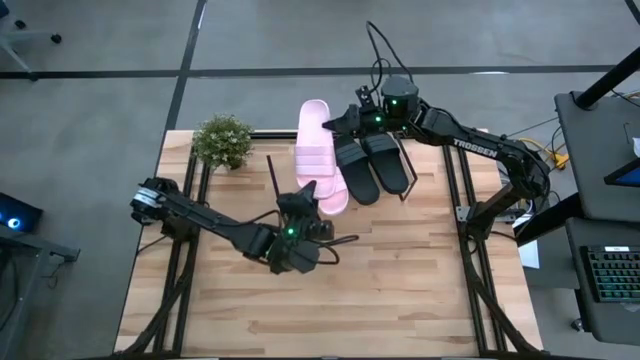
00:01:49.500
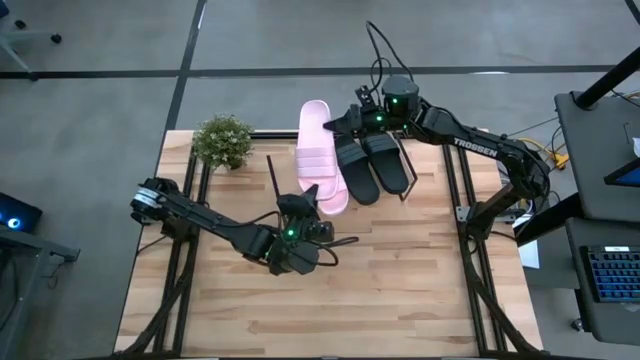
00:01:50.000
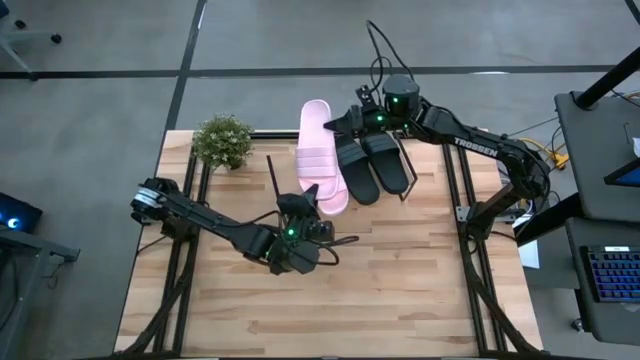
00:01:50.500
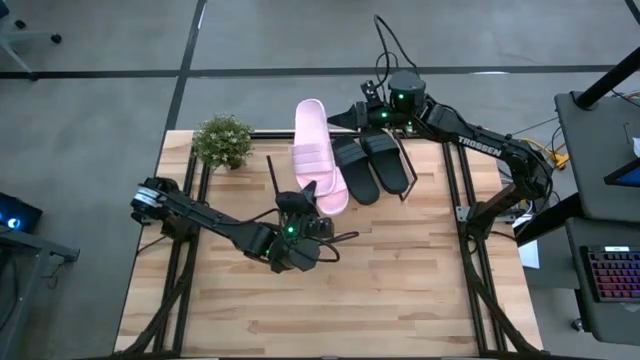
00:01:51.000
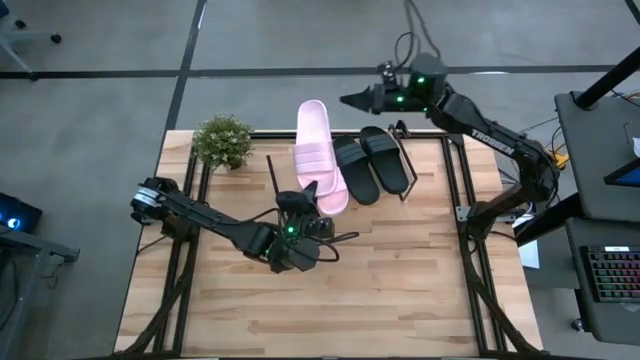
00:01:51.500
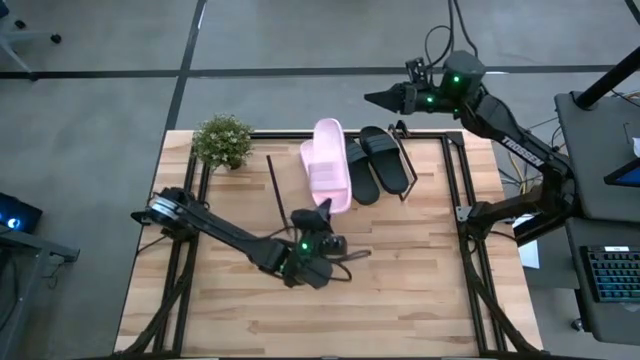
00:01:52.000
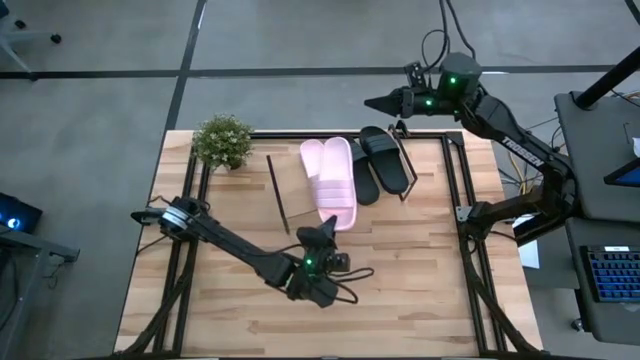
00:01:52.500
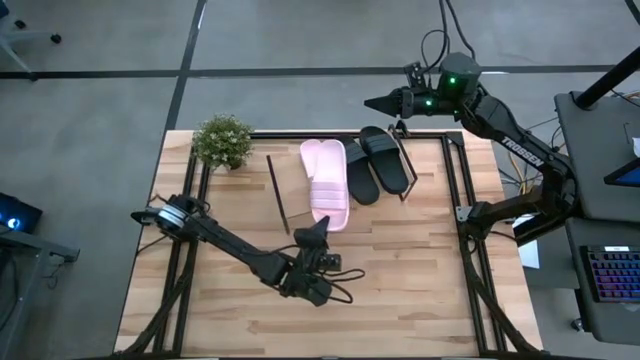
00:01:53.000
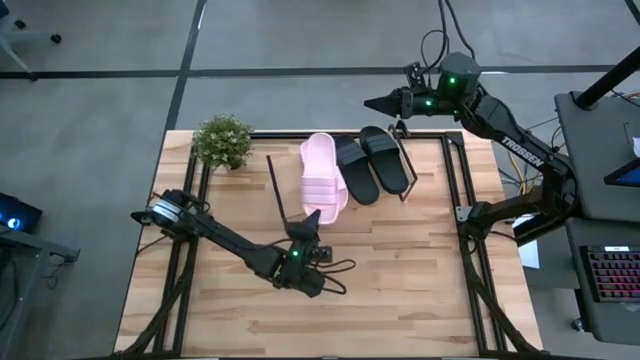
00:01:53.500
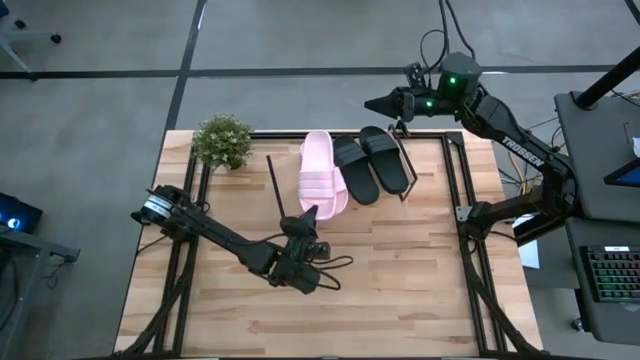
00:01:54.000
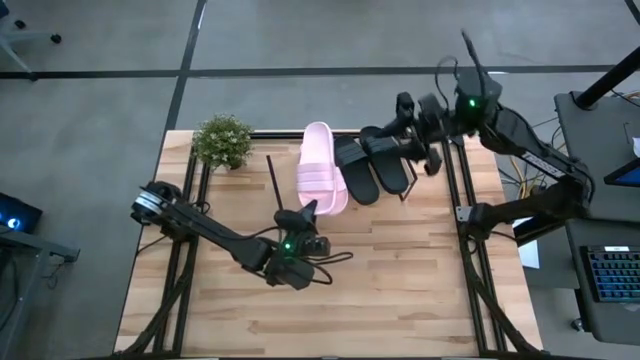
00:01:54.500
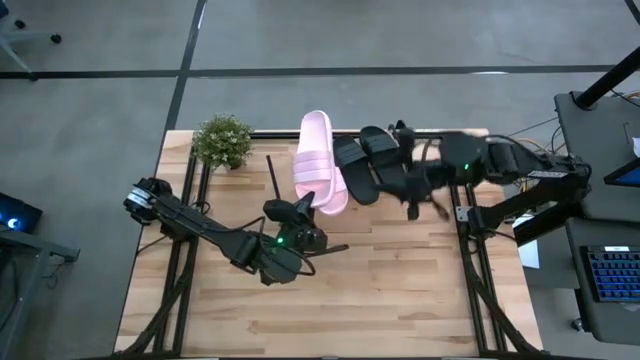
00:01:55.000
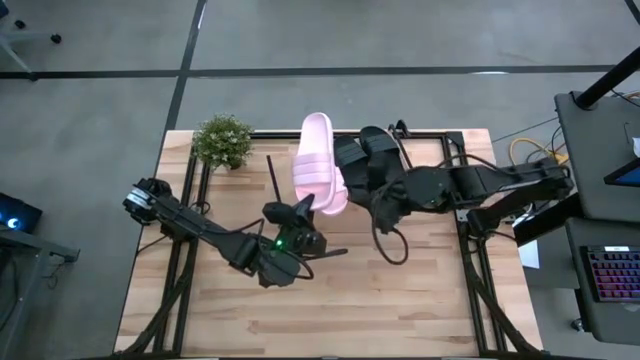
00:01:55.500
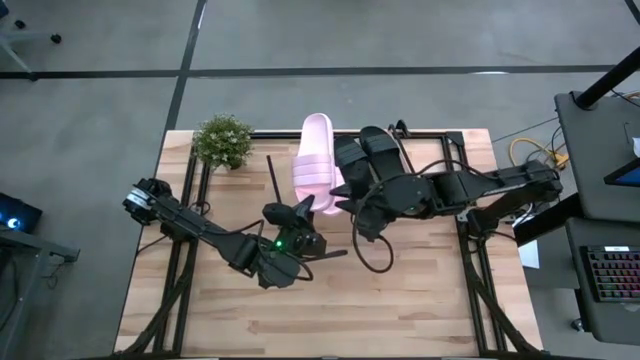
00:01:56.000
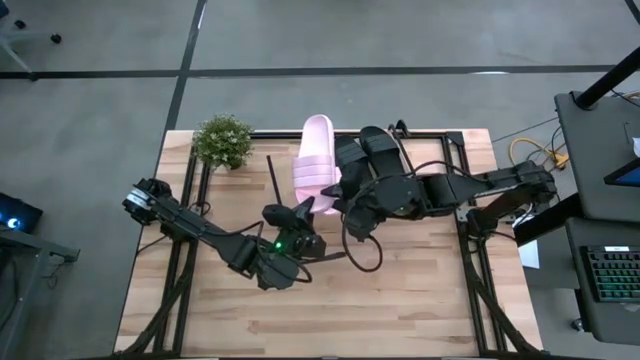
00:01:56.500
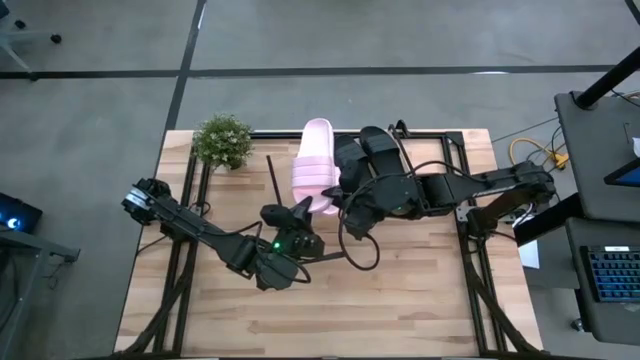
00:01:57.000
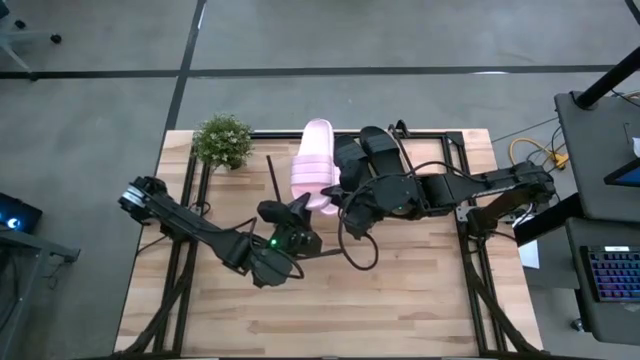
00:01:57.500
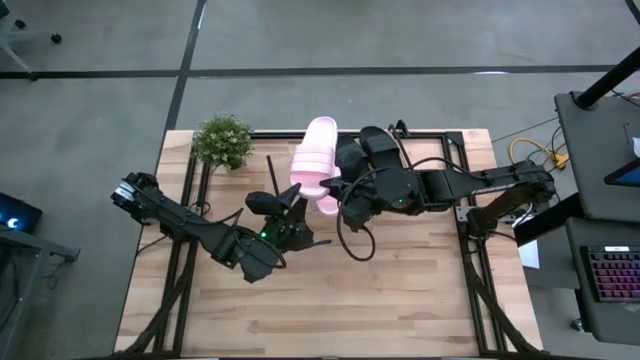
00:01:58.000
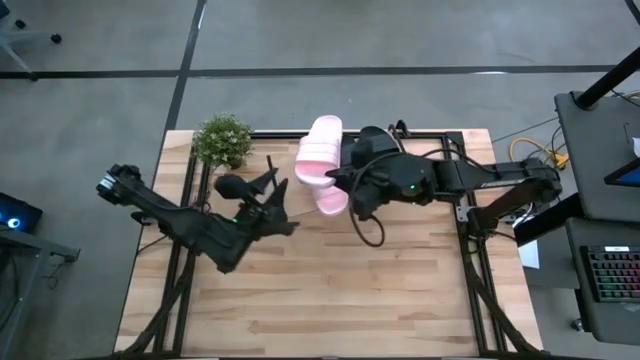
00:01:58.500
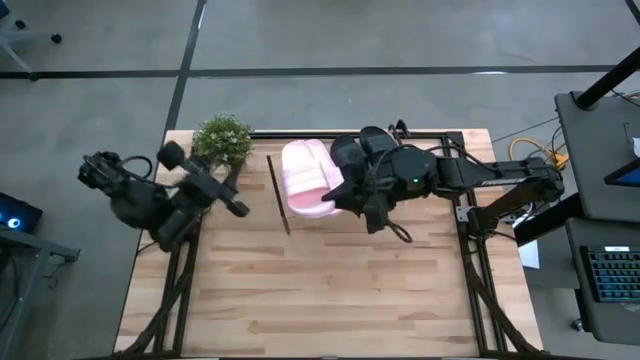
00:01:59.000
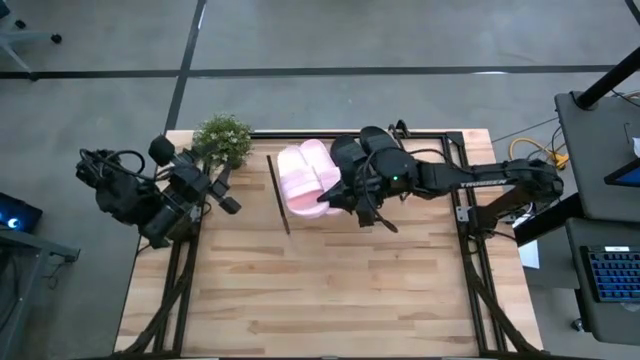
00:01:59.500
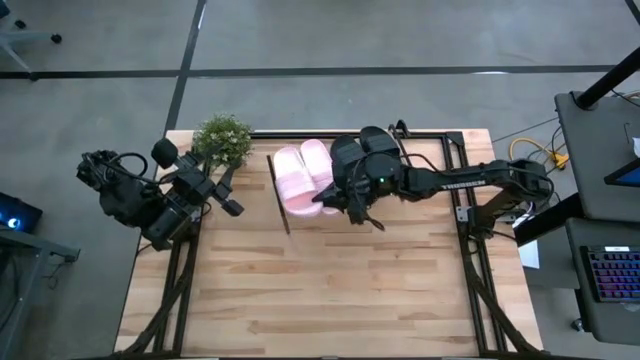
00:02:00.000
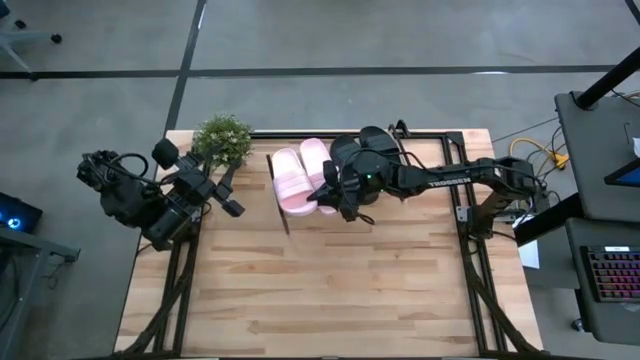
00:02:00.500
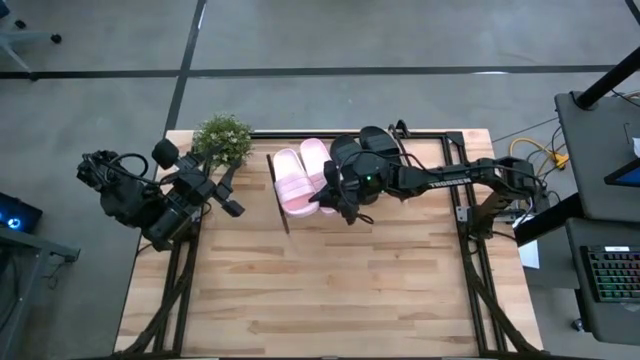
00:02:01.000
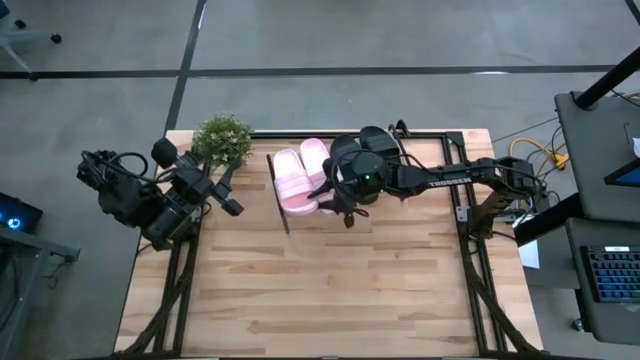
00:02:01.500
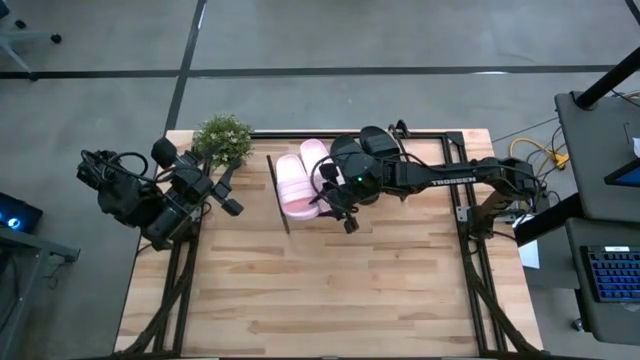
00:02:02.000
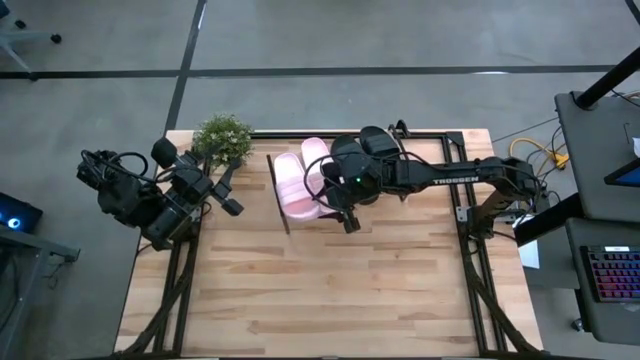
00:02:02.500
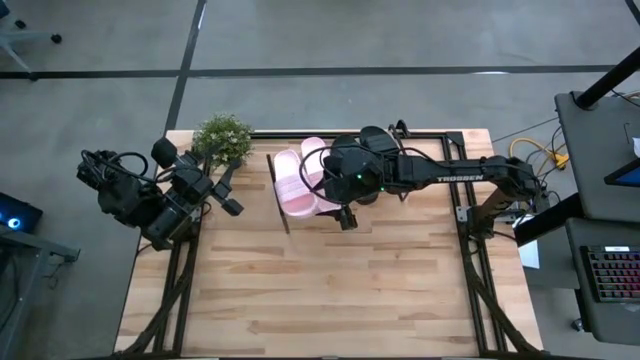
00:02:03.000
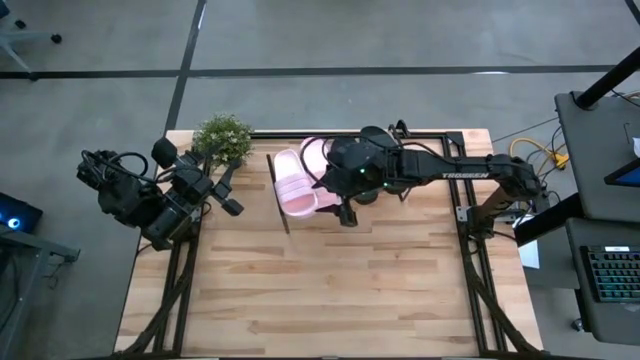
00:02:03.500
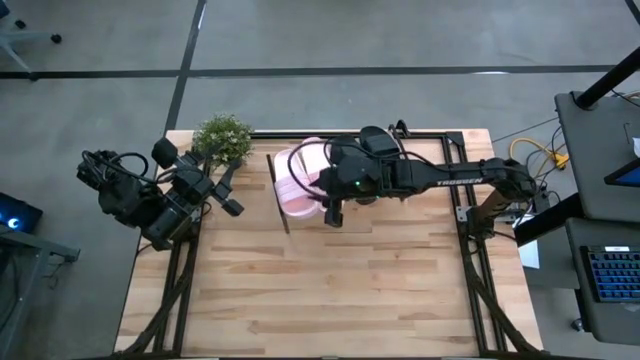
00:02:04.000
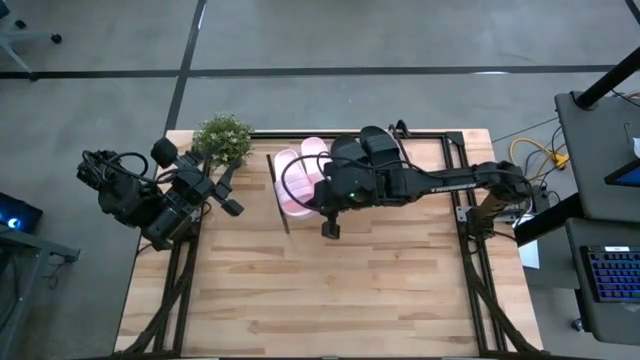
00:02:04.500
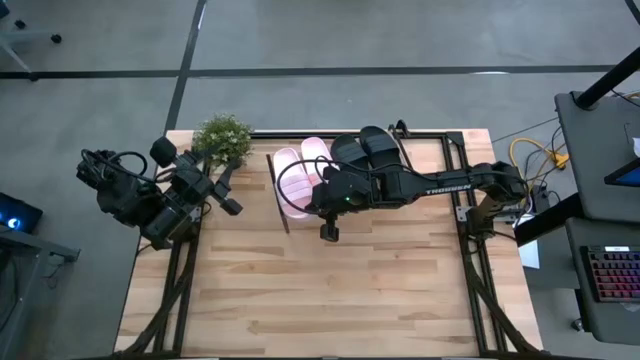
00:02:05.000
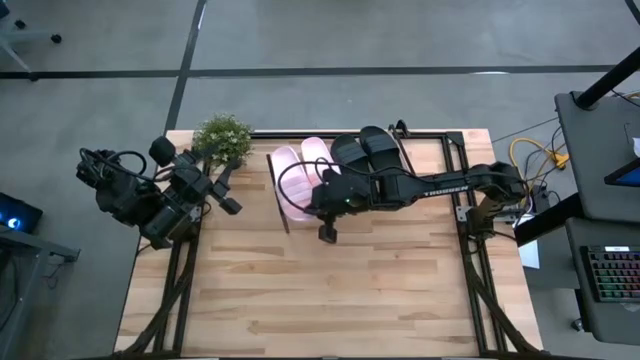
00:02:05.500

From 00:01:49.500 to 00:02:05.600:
Task: Pick and place slides into the shelf
Put the pink slipper on the shelf

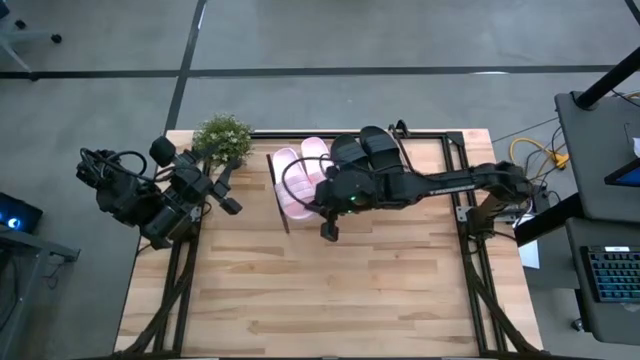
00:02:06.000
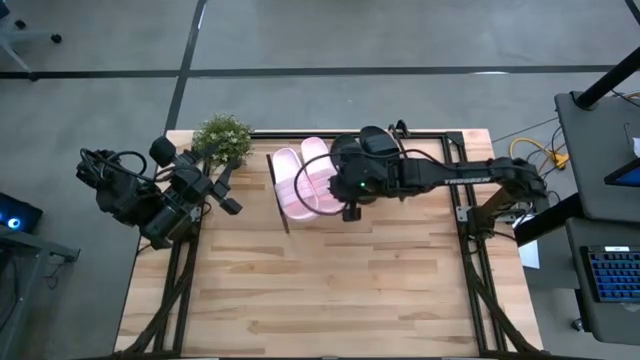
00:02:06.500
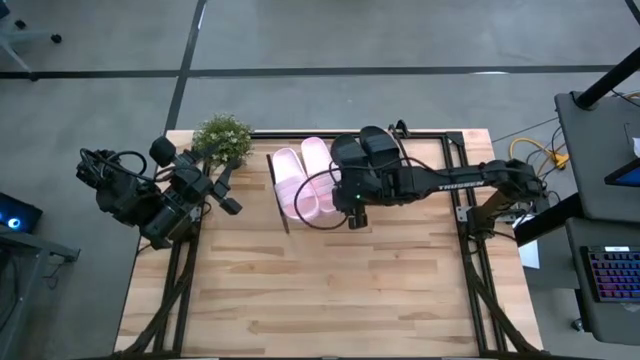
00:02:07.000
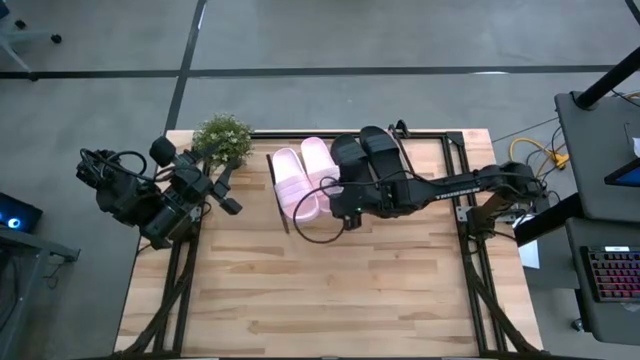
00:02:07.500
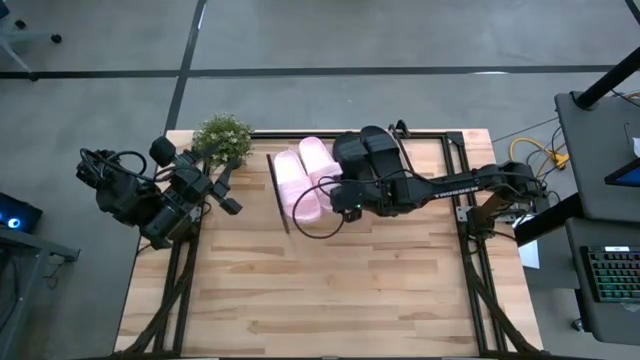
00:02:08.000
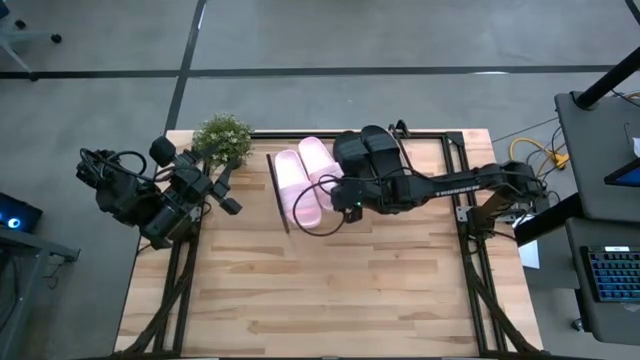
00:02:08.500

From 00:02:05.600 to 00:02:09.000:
Adjust the right pink slipper on the shelf
